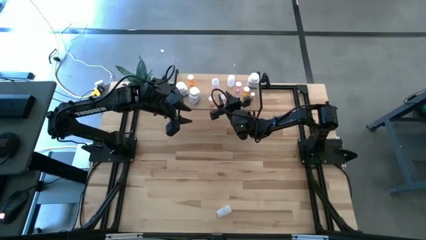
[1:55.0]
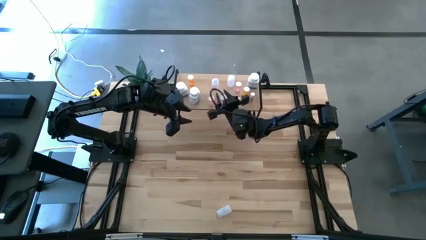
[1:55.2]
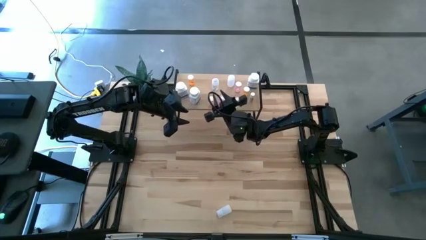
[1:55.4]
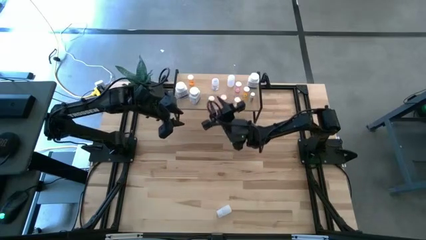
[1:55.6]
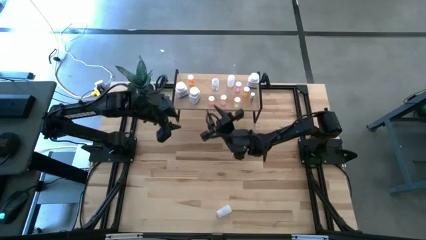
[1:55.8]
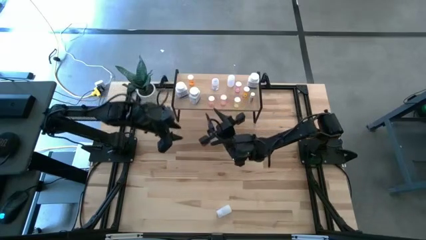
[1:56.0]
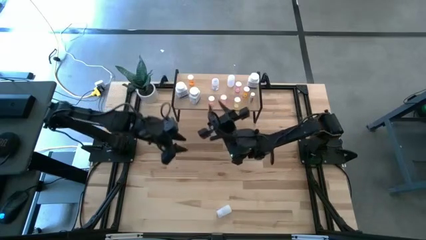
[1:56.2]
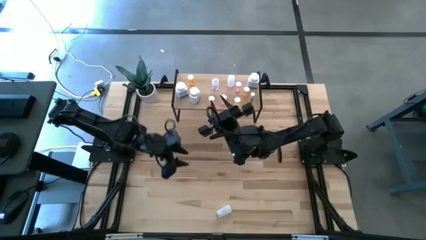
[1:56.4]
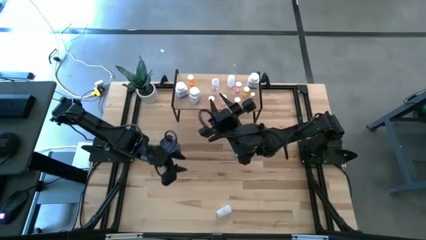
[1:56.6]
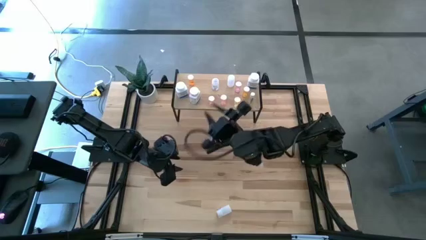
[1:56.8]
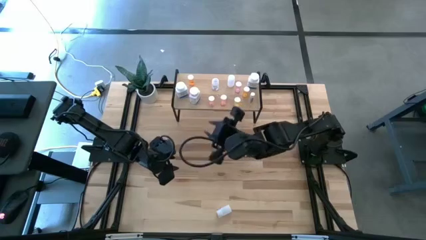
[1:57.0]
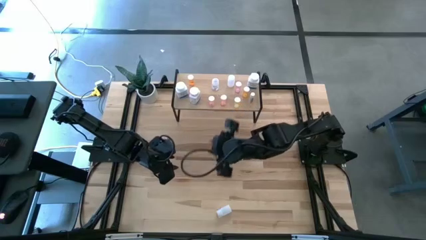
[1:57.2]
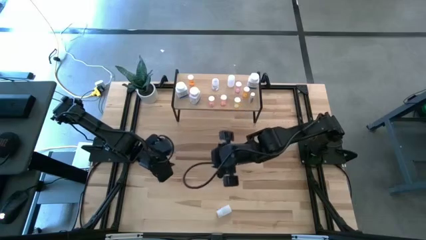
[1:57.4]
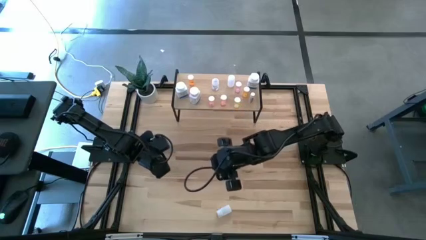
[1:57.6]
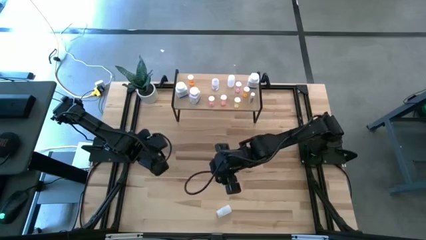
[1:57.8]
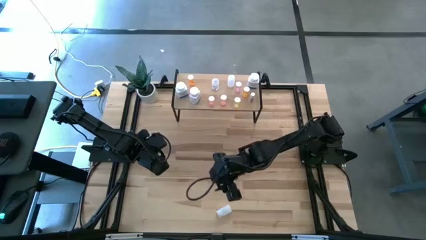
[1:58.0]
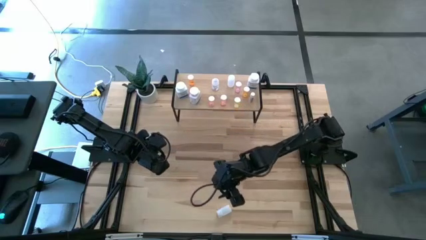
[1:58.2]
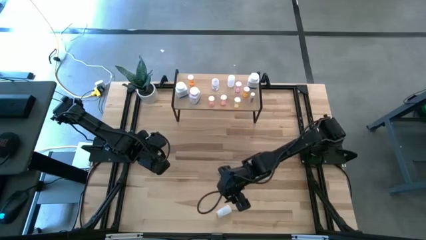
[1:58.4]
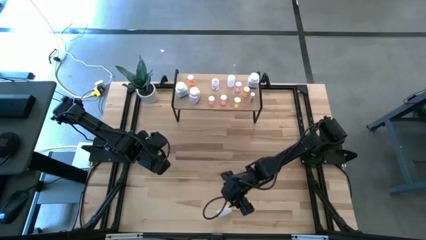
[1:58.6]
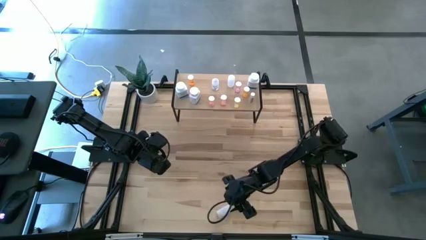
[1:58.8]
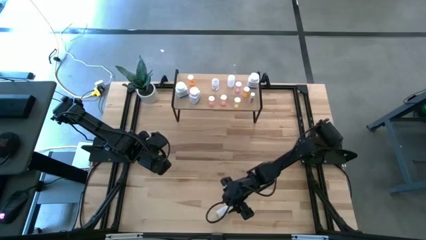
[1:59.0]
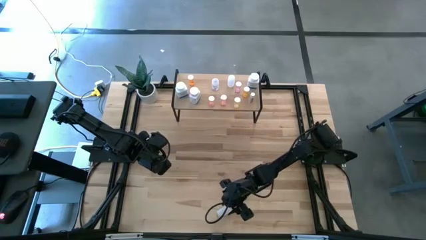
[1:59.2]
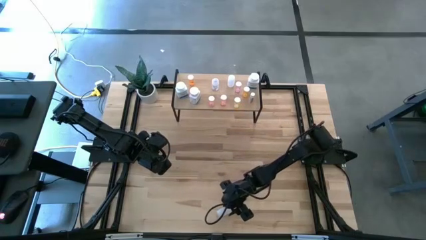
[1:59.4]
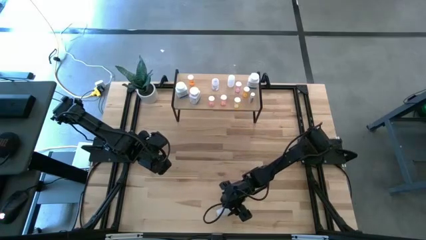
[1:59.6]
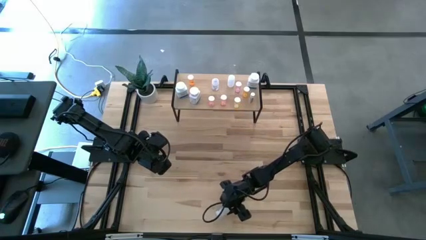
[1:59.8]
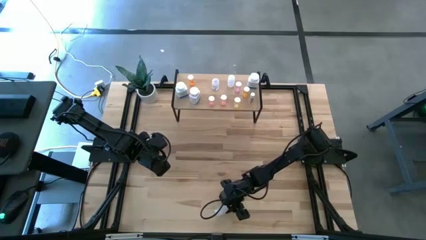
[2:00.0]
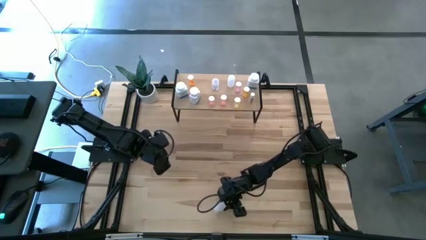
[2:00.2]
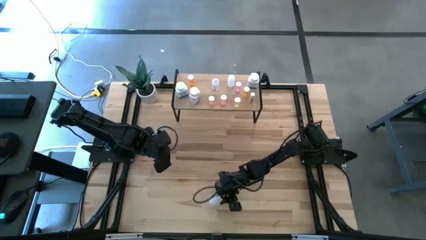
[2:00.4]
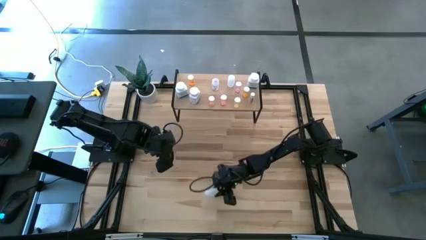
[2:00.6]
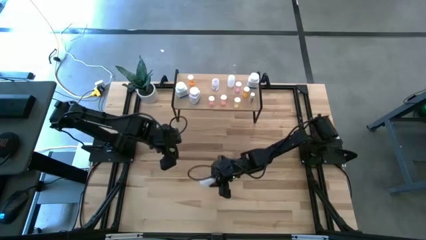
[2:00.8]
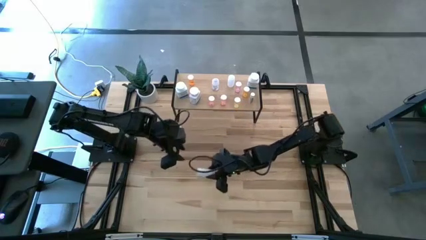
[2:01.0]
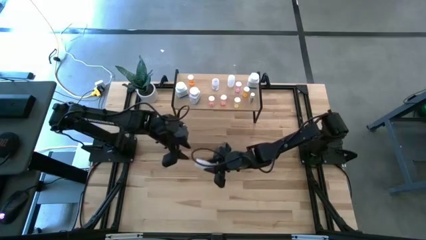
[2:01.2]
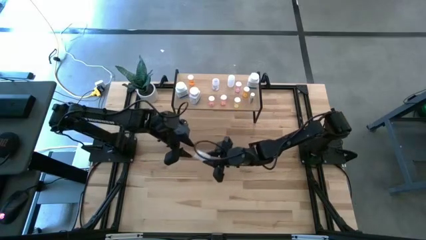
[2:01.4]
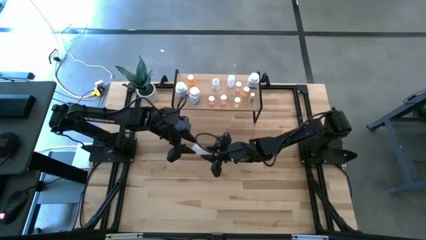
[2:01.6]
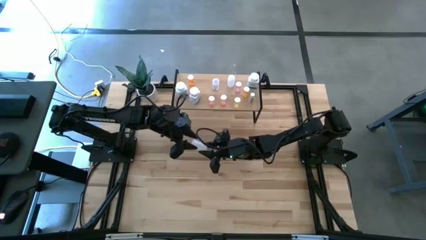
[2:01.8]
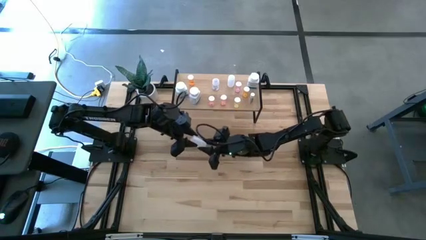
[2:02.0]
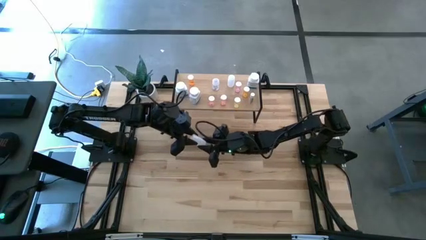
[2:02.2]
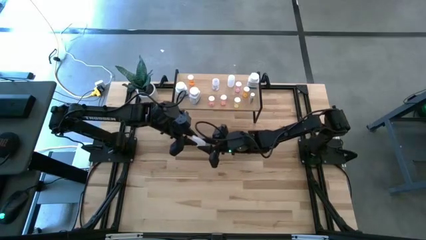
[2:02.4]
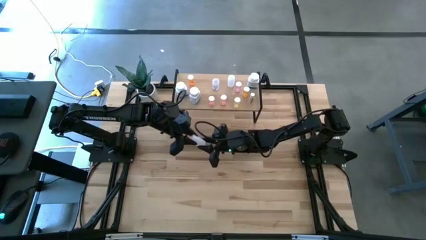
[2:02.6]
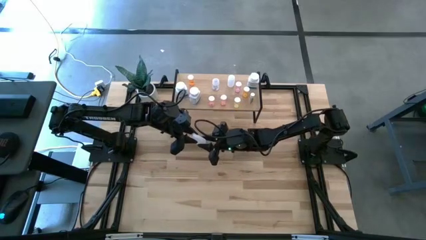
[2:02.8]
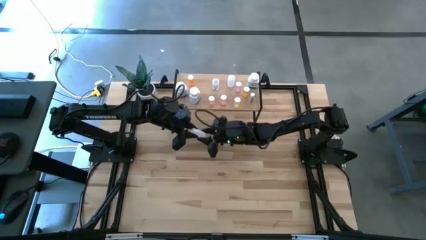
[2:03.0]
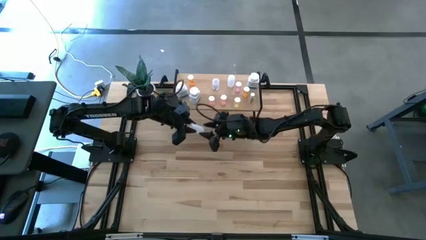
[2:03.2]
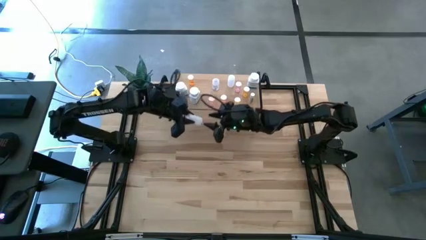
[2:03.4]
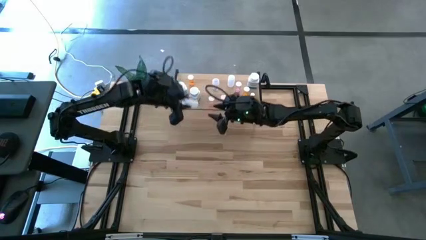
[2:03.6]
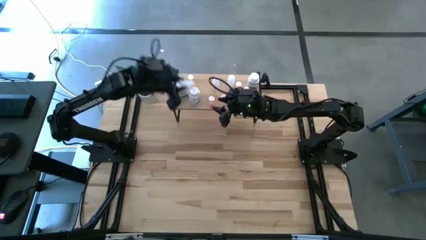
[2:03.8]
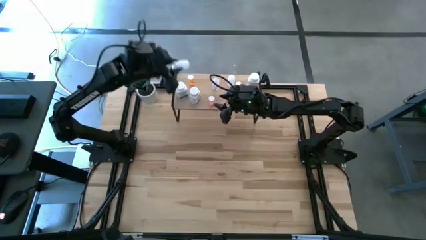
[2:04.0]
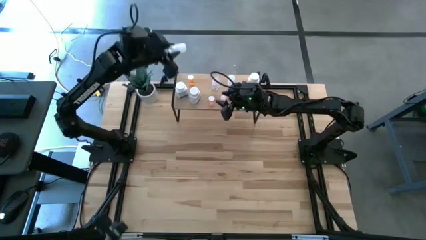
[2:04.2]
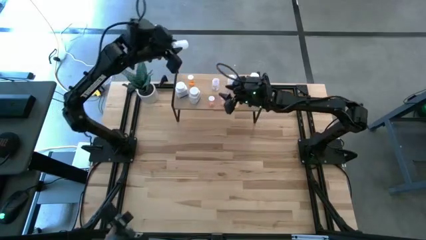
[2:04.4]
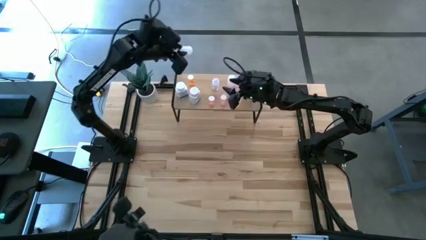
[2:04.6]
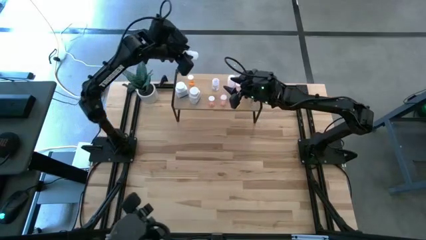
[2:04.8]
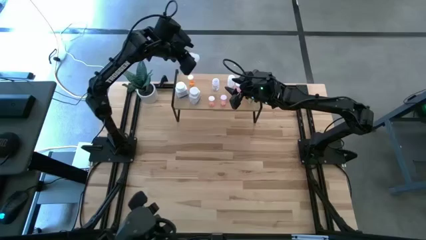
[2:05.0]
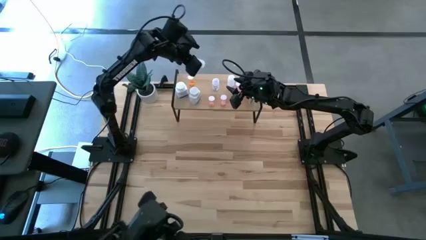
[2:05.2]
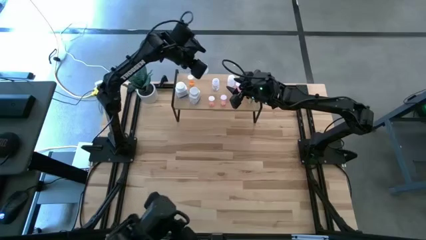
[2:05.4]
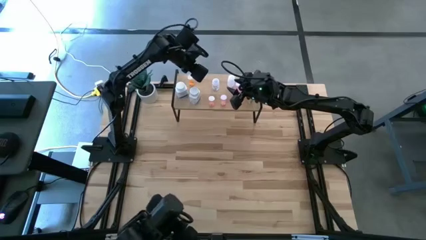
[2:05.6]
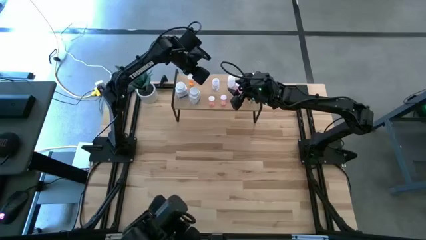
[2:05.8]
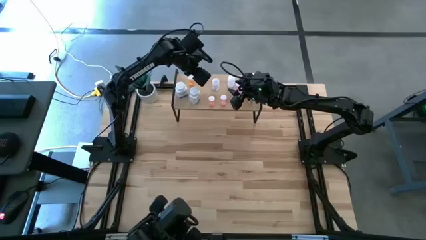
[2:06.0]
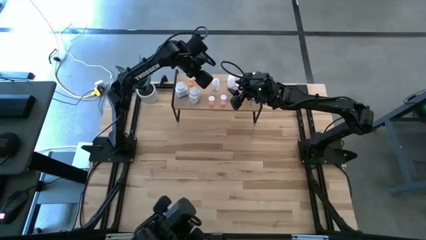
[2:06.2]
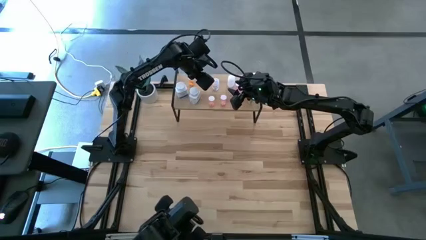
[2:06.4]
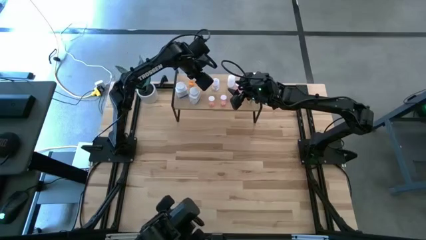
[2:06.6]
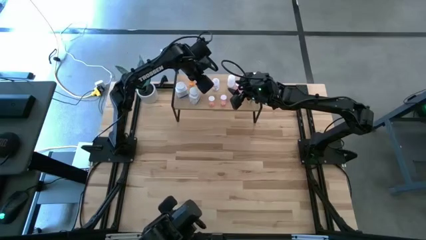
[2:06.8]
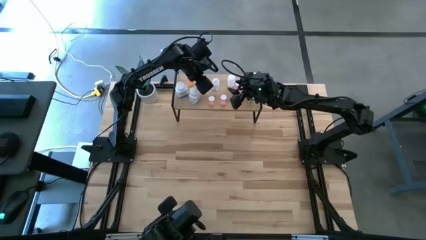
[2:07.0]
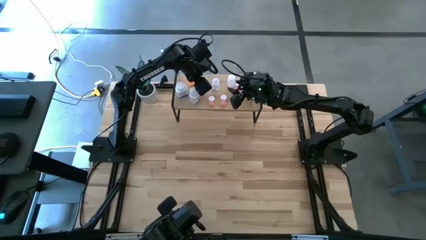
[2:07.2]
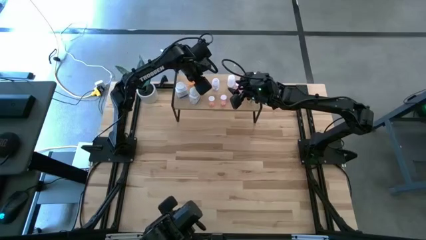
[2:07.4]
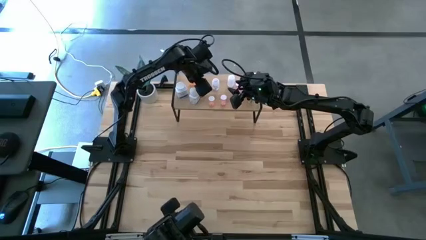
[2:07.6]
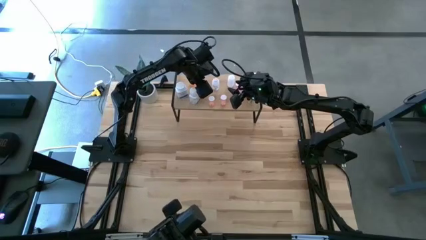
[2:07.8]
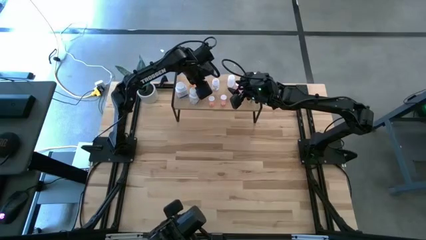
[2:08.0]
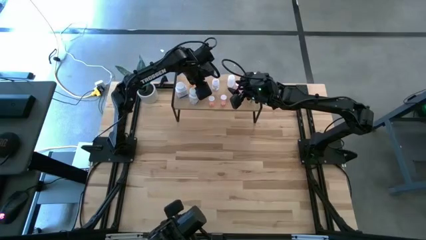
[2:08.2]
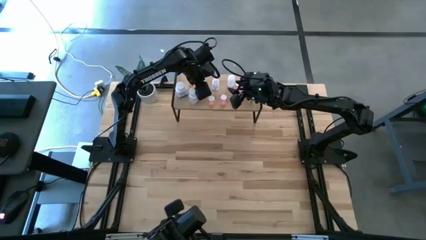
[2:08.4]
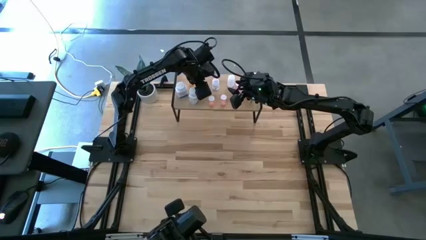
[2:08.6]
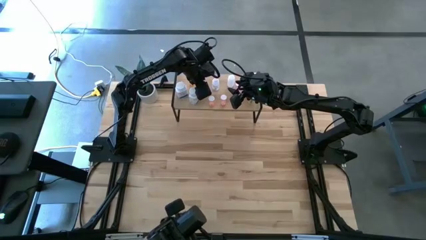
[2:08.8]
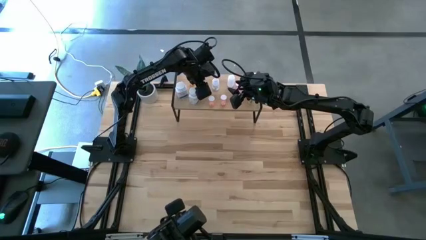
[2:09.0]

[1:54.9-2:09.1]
Task: Pick and place medicine bottles onto shelf by color
Put the white pill bottle on the shelf

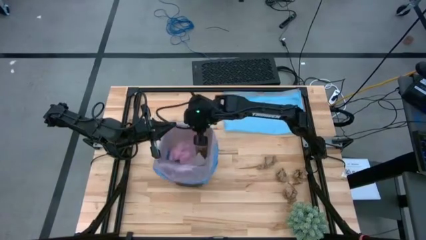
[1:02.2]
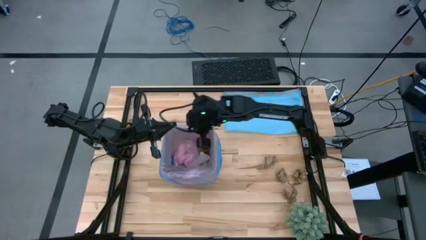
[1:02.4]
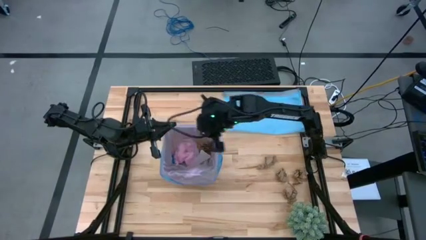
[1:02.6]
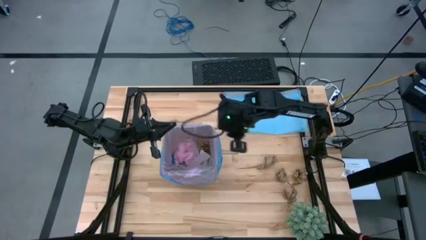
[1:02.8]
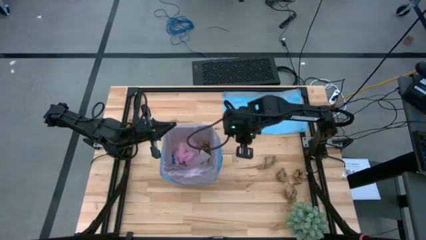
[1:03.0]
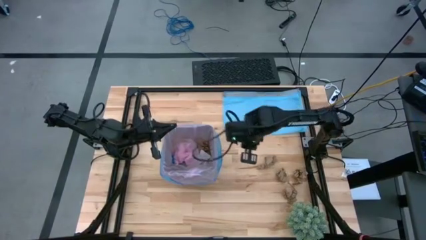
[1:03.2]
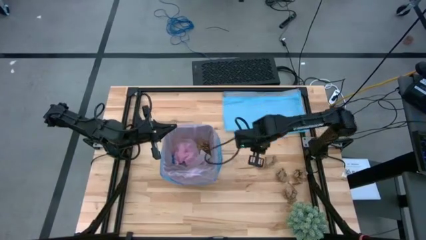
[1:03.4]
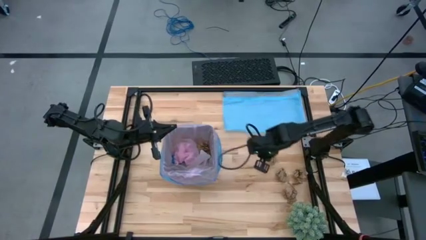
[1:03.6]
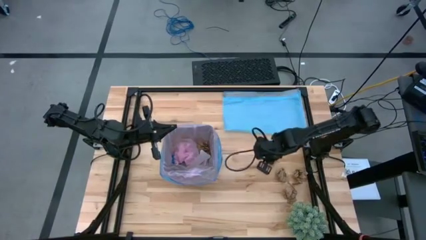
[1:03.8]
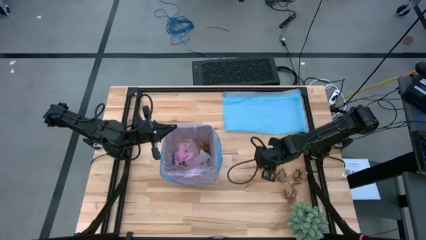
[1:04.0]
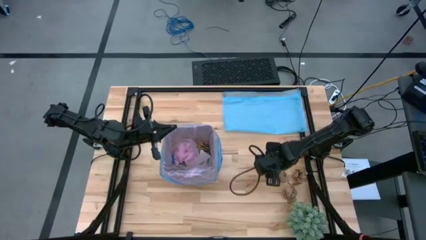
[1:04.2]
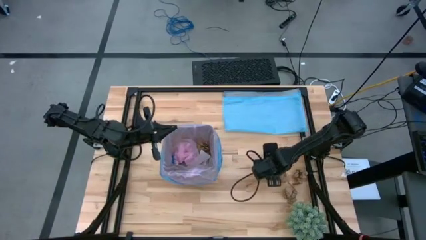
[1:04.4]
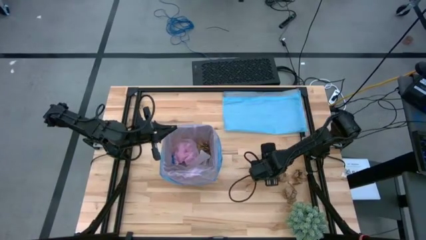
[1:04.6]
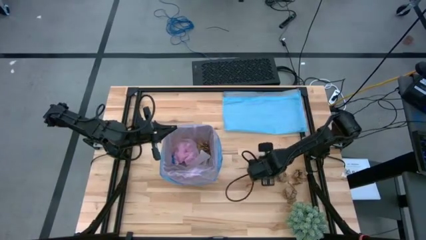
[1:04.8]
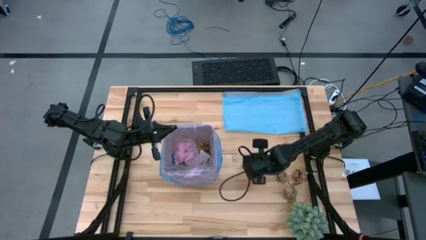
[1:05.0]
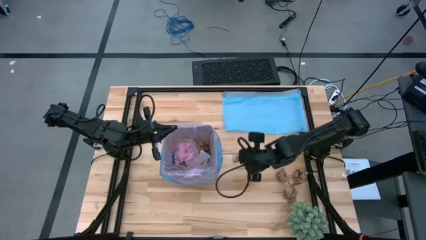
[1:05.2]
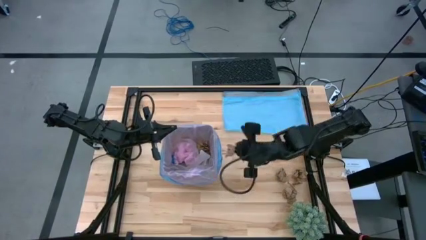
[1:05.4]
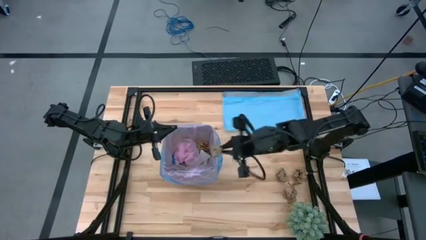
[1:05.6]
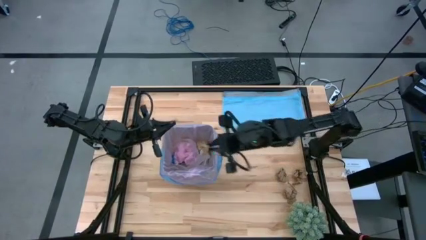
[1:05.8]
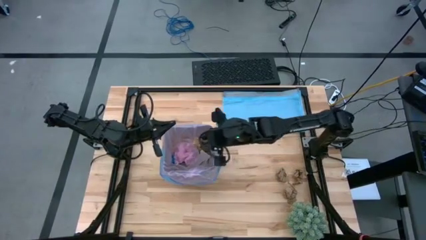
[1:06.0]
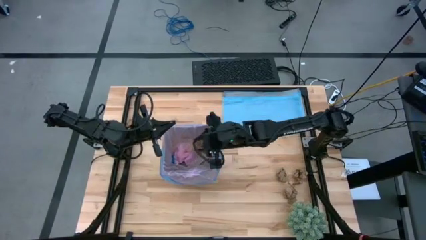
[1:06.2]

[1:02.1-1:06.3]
Task: place trash/remove bag and relplace
Put the brown napkin into the trash bin
